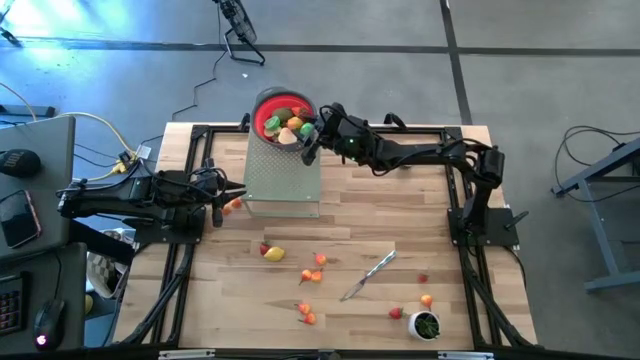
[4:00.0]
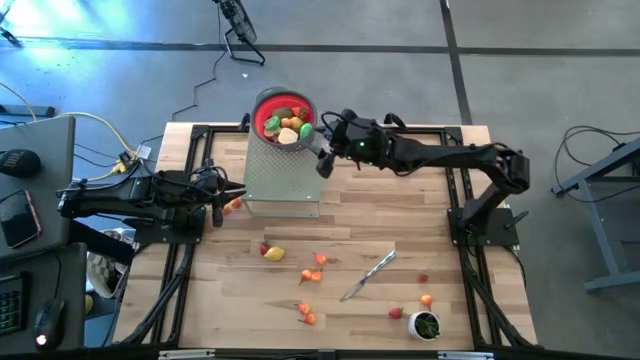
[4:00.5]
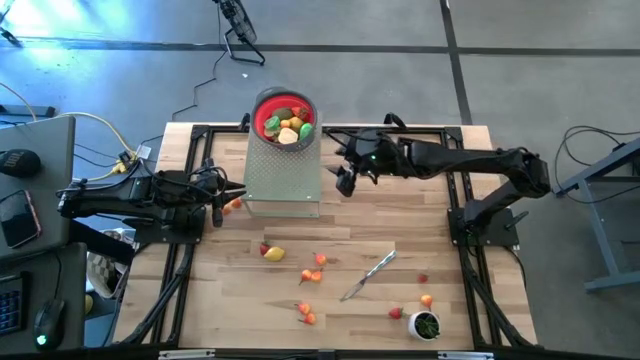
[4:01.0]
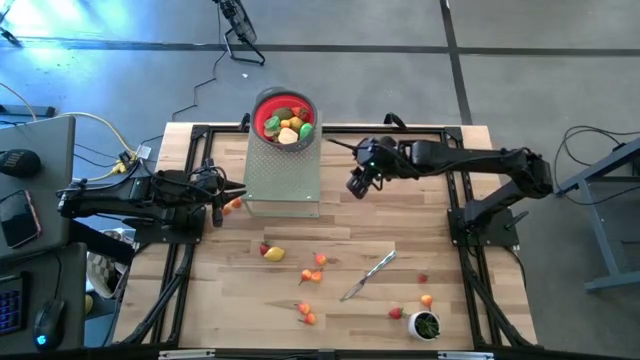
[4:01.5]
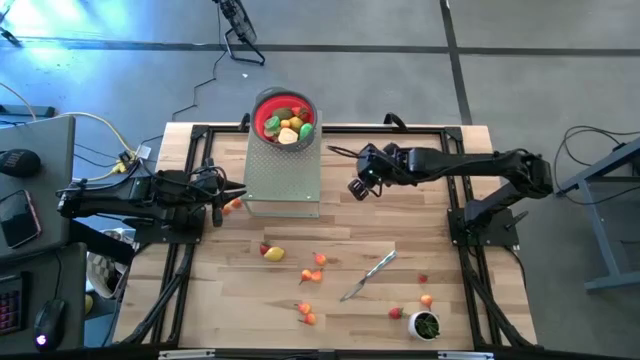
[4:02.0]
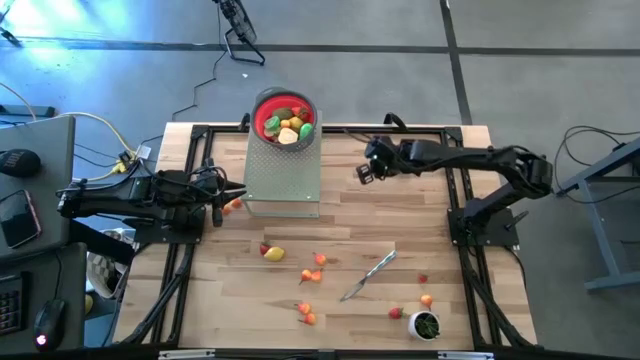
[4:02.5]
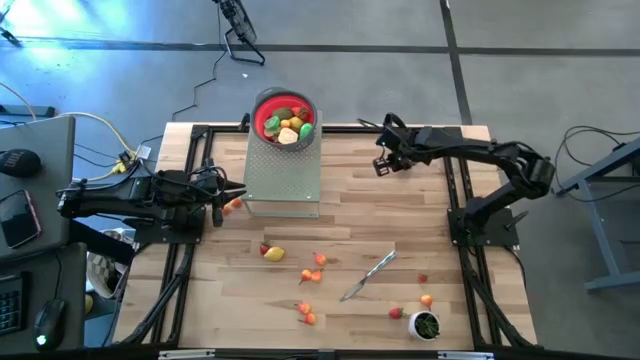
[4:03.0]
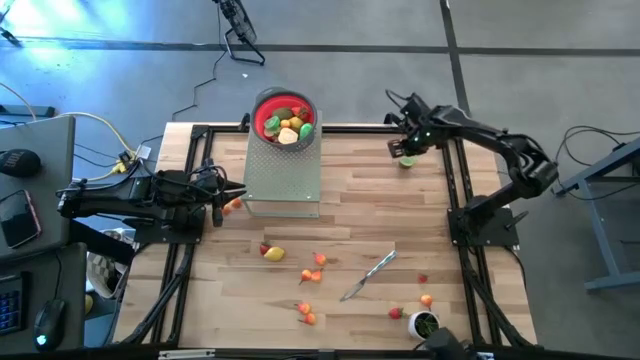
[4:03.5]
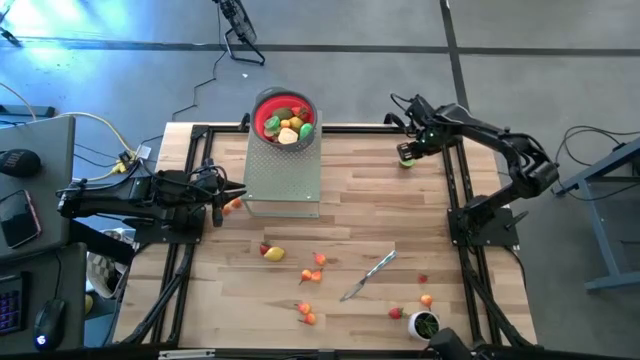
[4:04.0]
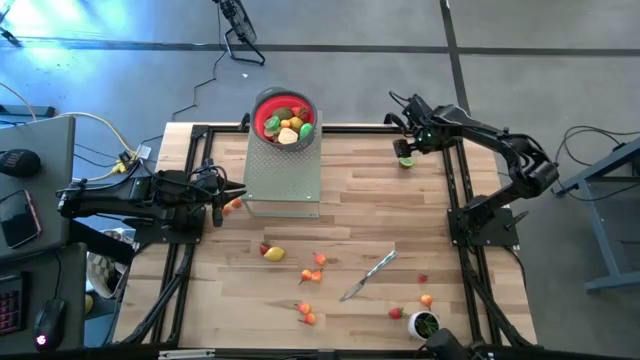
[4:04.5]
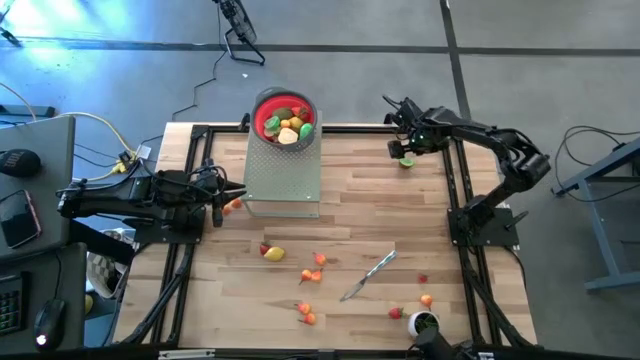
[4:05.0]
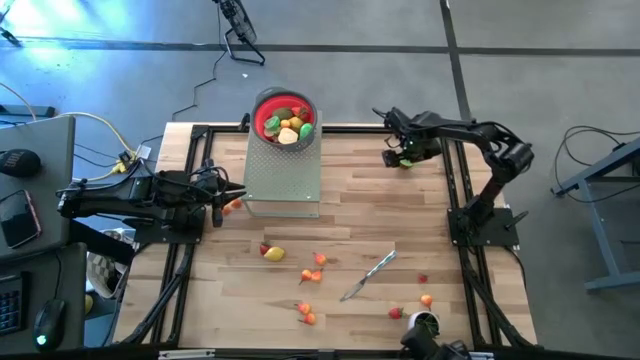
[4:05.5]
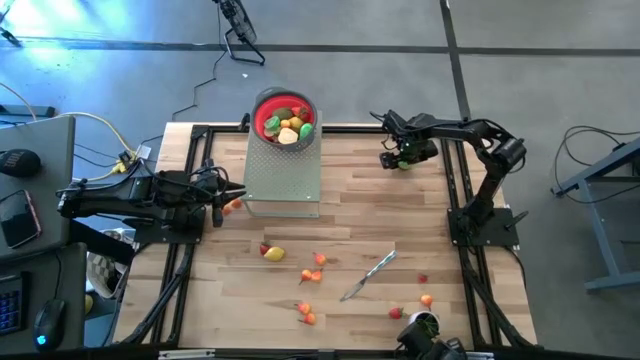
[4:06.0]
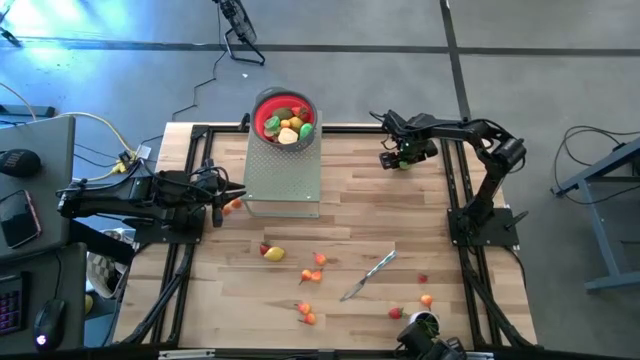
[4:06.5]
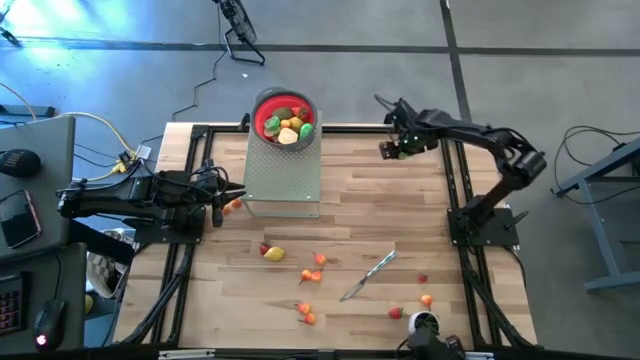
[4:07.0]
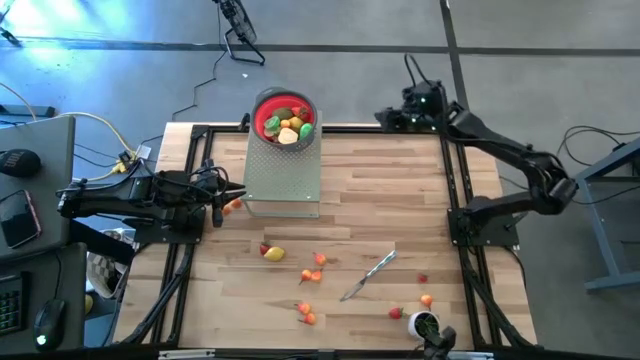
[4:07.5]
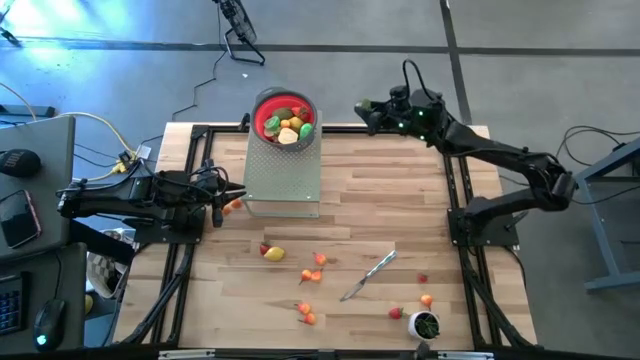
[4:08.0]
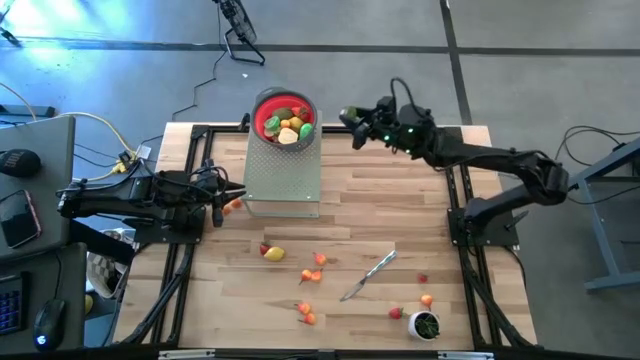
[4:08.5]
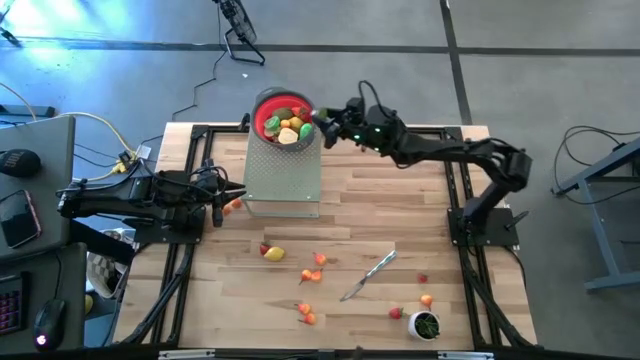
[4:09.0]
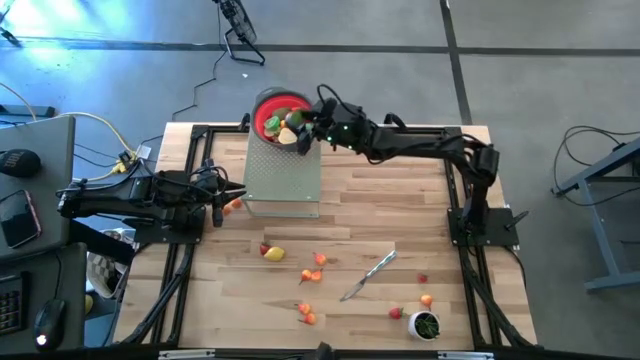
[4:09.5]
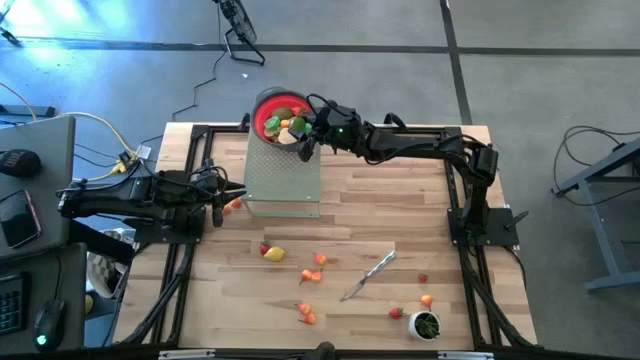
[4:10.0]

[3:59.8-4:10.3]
Task: Pick & Place Fruit
Put the half kiwi into the red strainer on the shelf

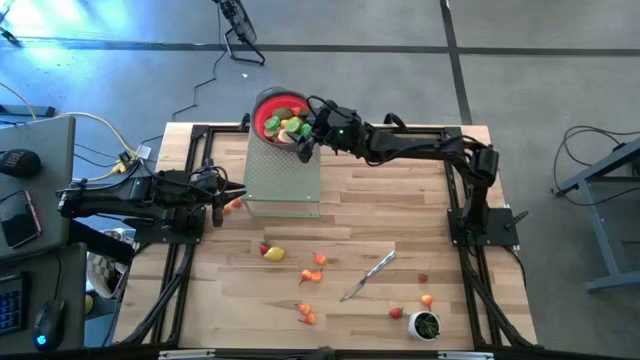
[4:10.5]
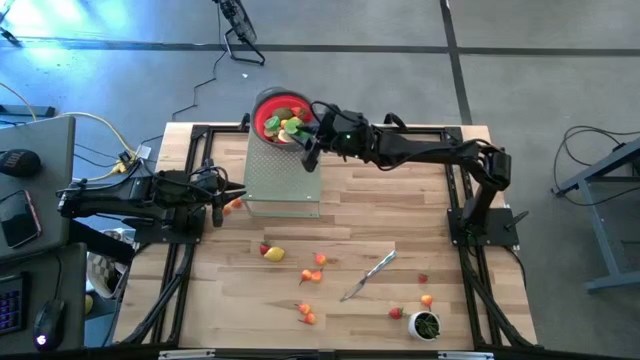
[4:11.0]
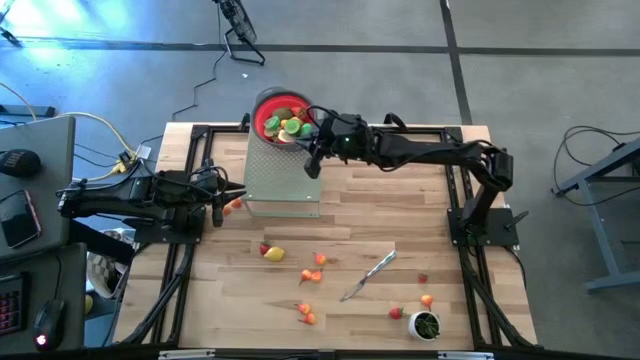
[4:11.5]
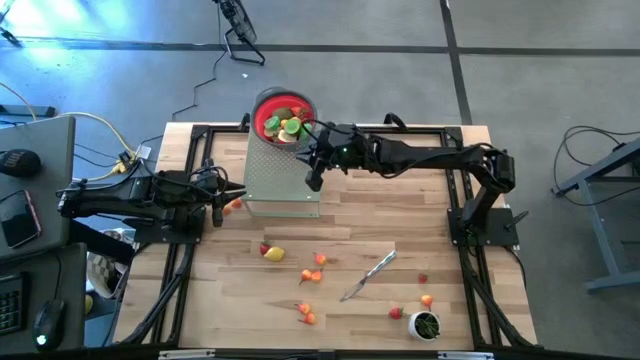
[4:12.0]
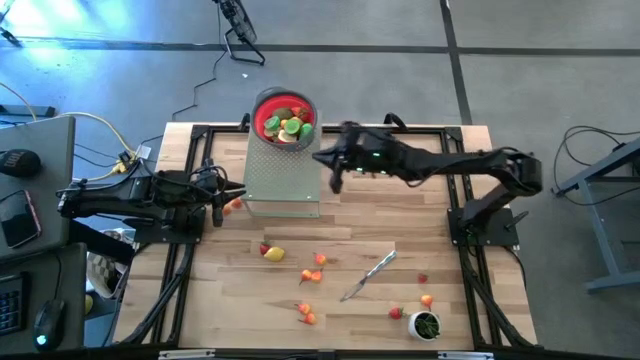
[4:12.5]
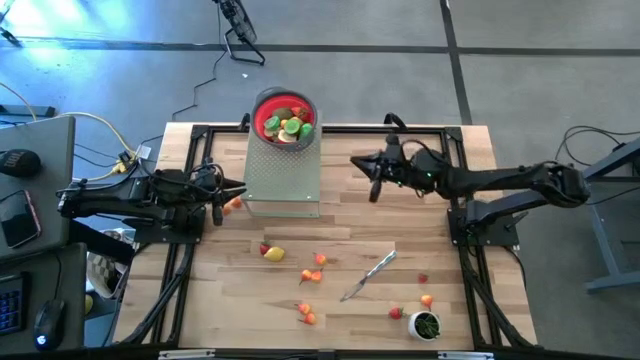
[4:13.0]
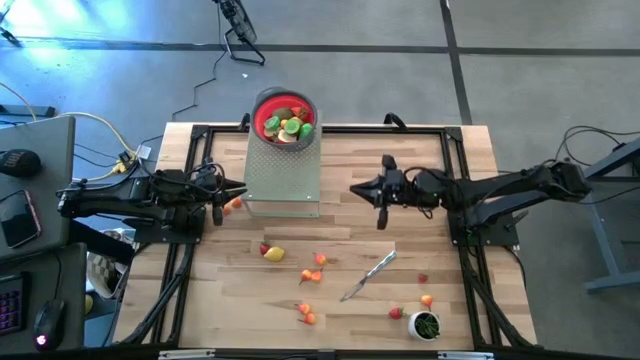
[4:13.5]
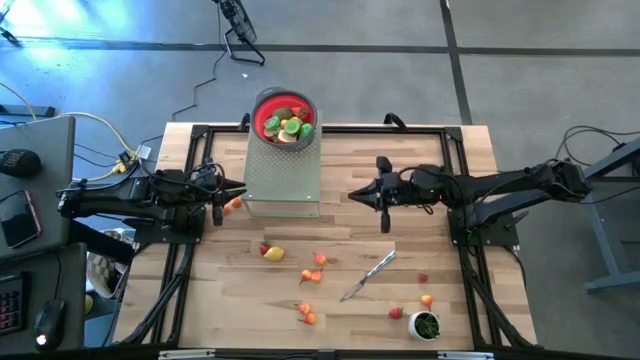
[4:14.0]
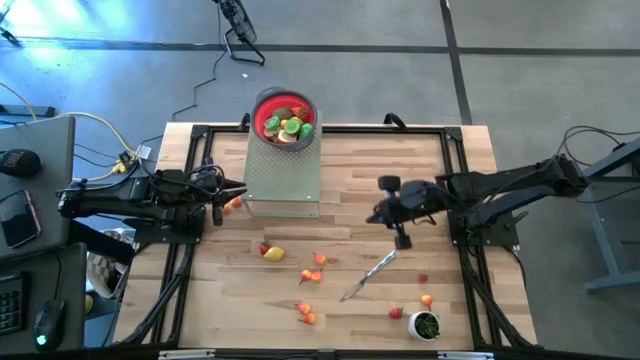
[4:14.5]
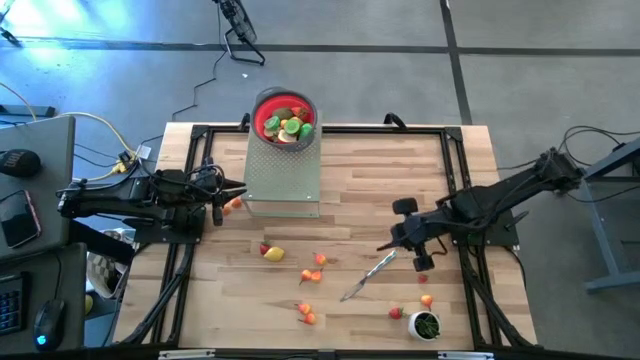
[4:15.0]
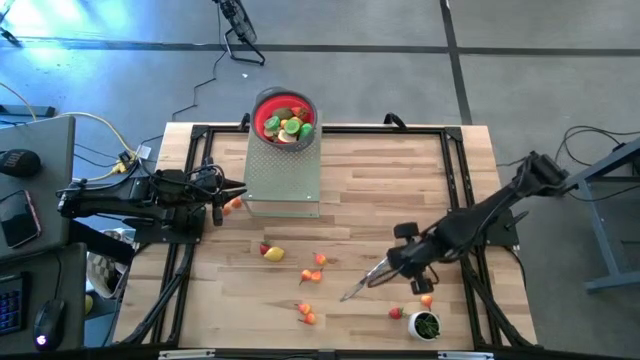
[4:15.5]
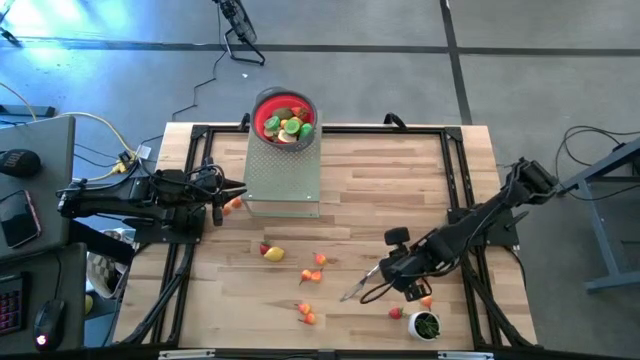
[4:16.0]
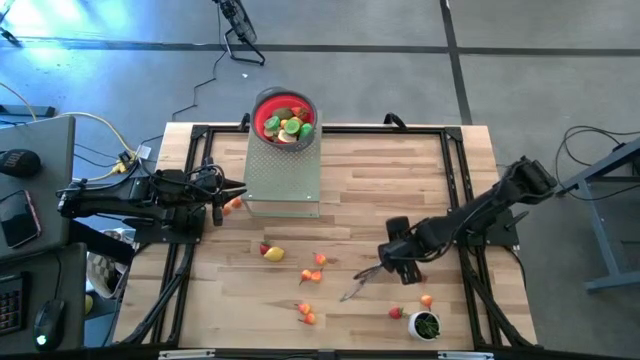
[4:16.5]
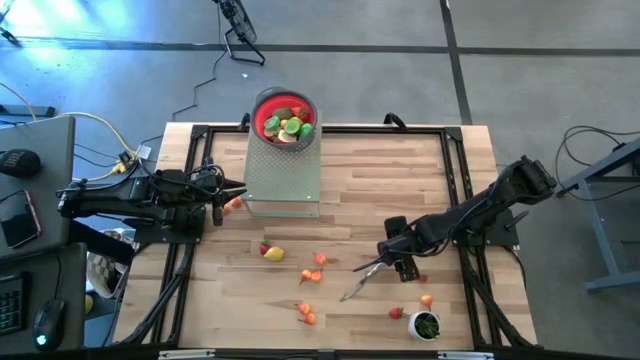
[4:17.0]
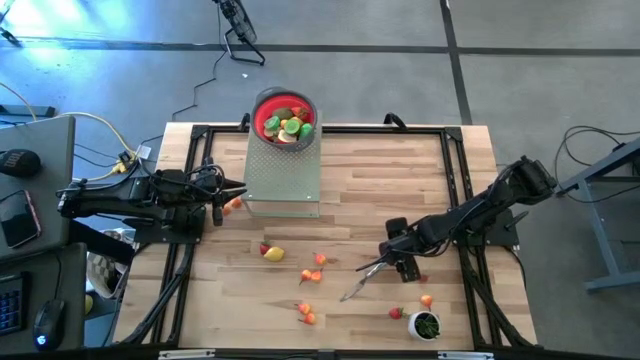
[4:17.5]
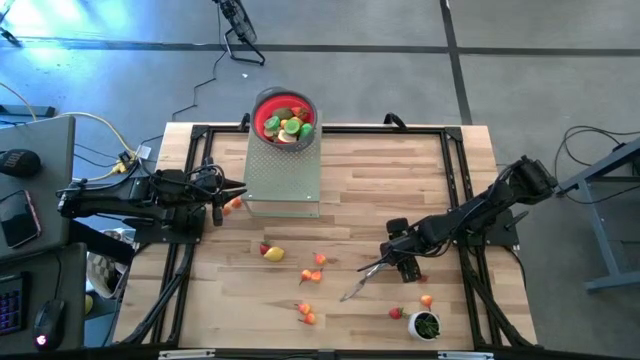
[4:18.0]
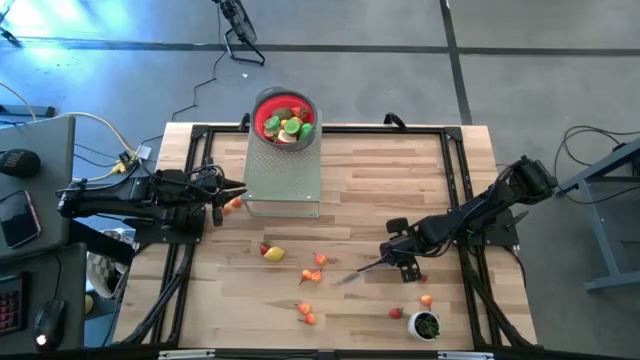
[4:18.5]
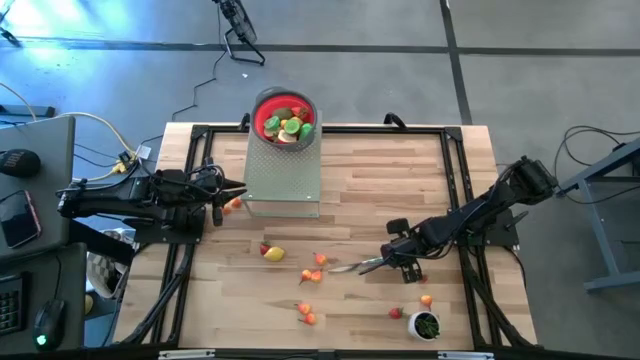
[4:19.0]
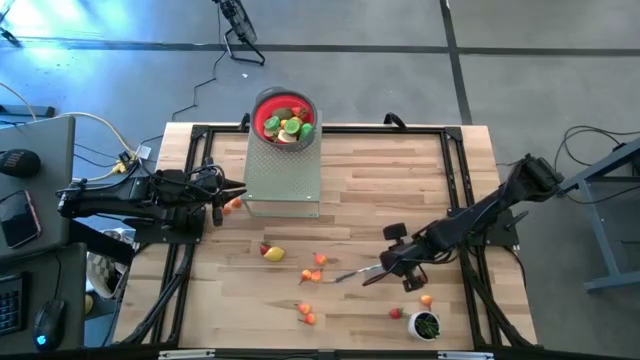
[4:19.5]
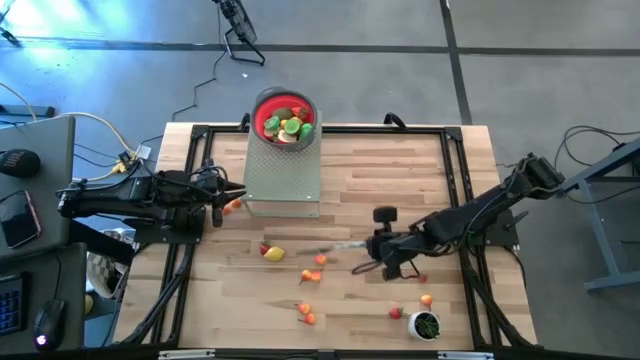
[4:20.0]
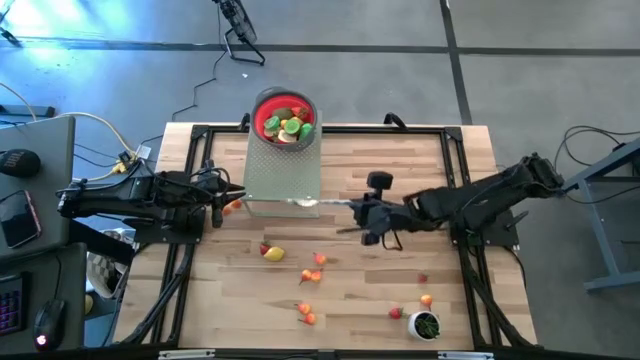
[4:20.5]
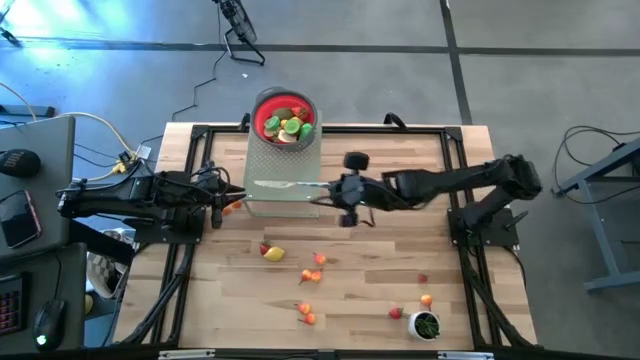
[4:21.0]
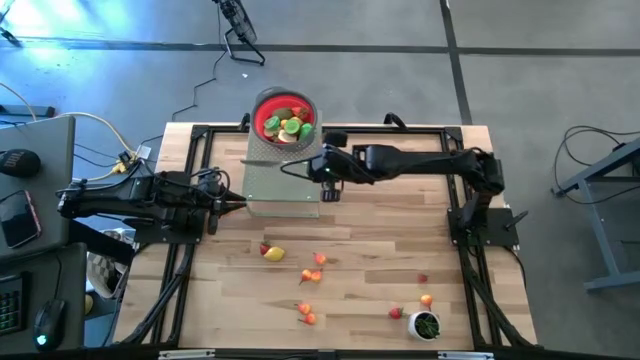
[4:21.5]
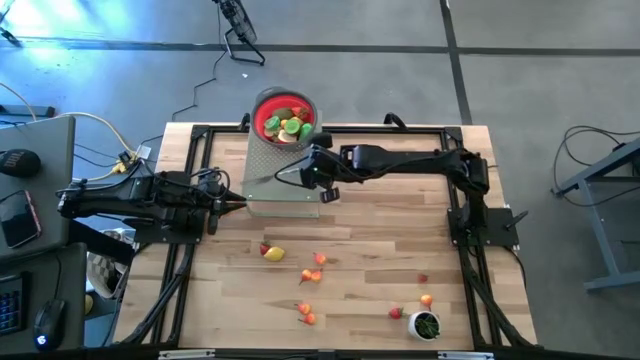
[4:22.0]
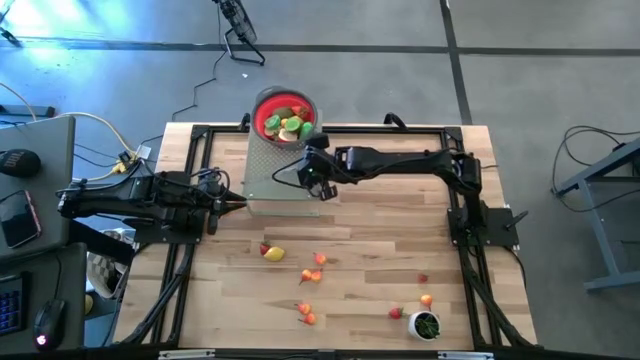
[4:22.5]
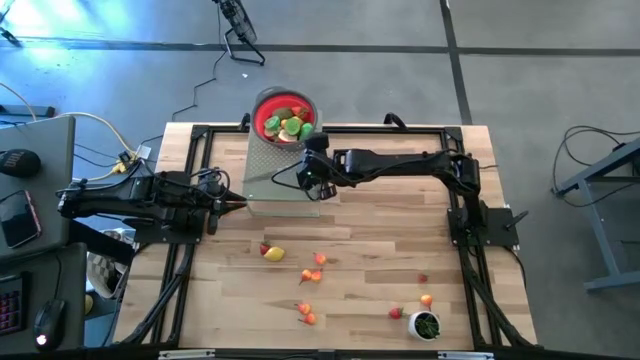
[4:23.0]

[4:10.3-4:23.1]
Put the blue table knife on the shelf
